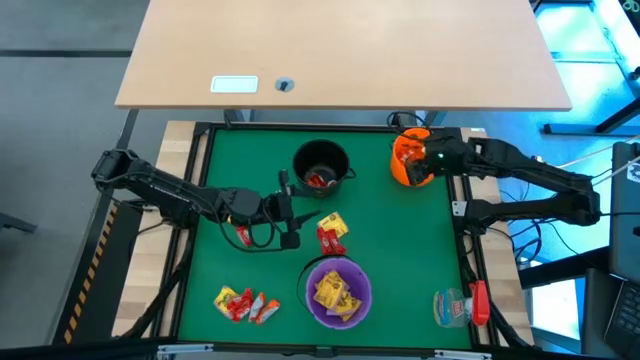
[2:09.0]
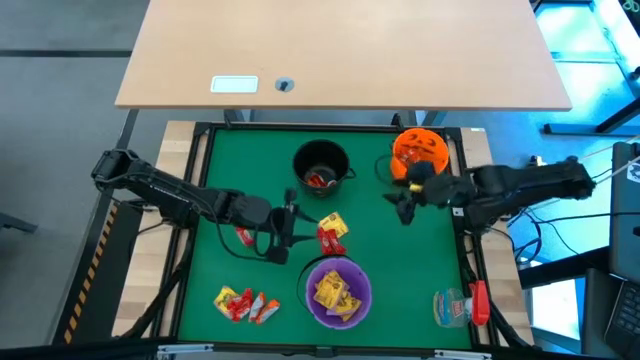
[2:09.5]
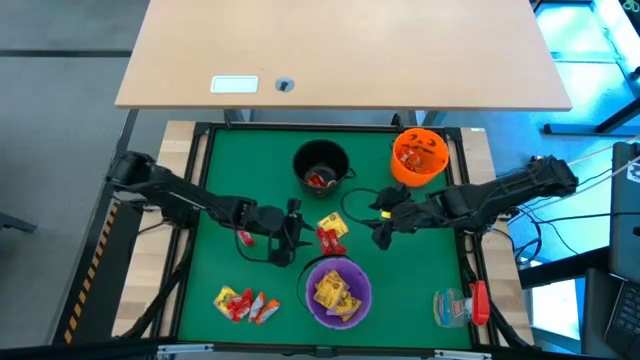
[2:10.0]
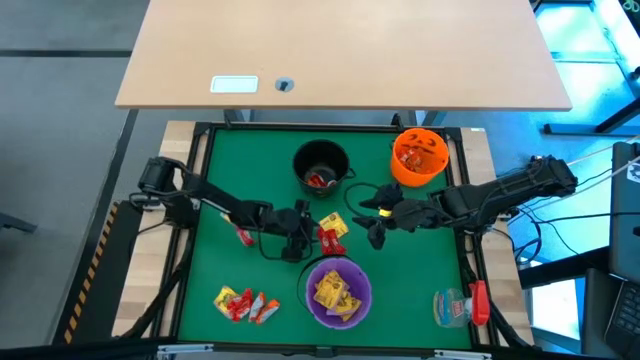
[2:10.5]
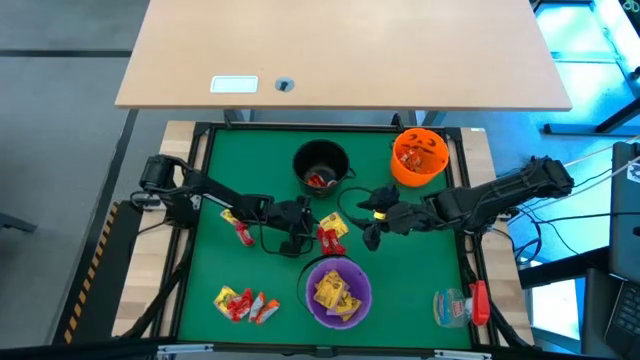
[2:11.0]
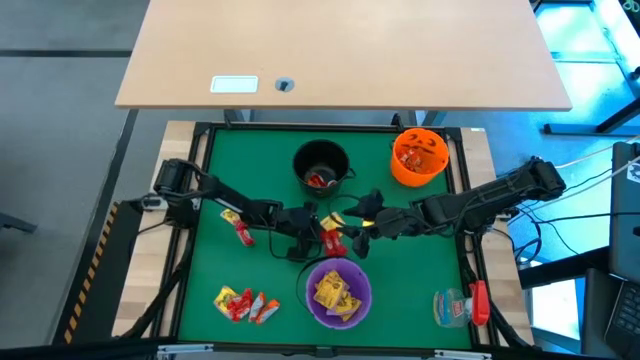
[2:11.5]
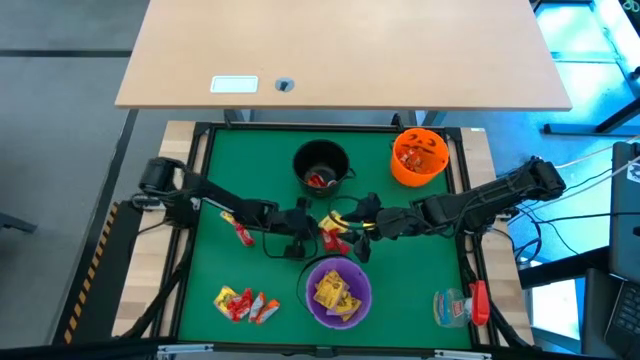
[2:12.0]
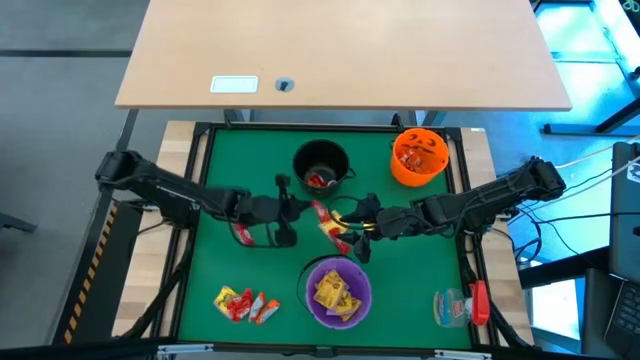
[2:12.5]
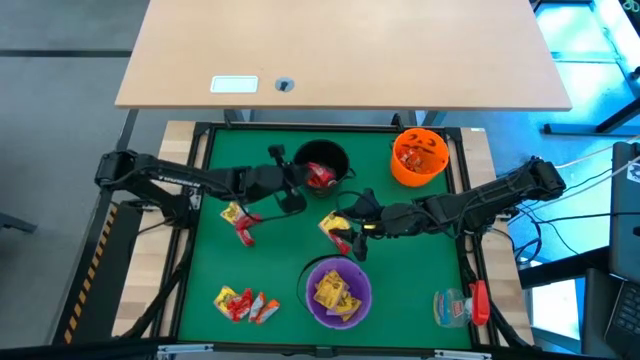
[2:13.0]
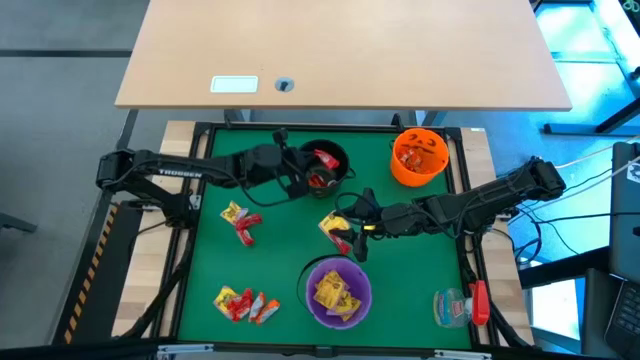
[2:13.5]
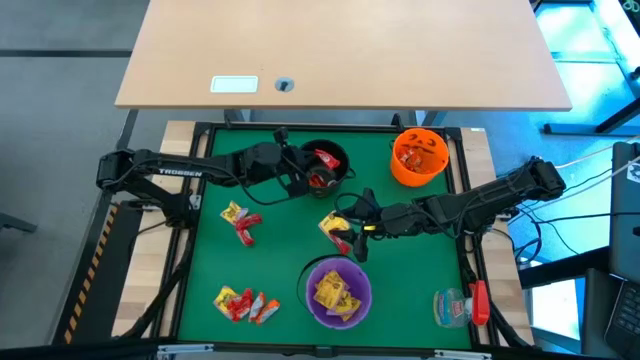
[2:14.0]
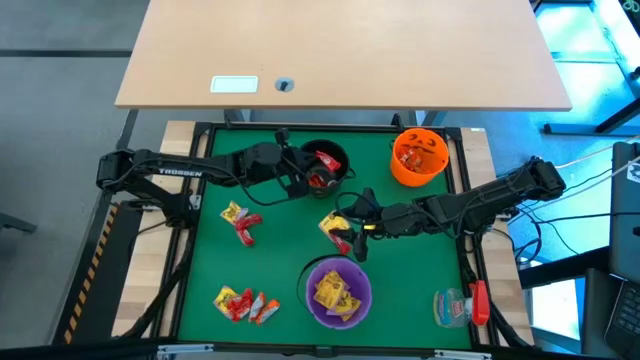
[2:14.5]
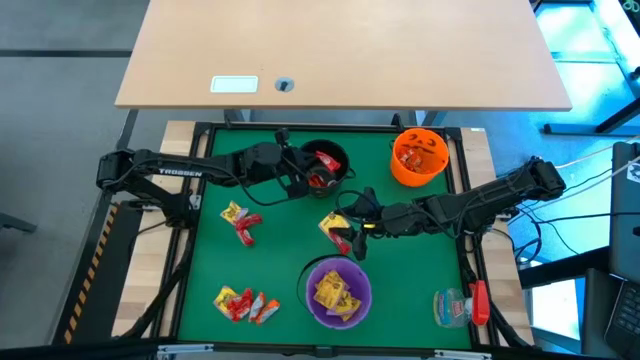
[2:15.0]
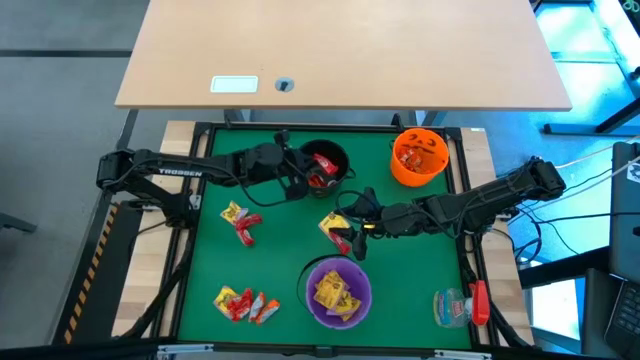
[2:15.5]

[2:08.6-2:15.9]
Task: Sort candy
Put the red candy into the black bucket

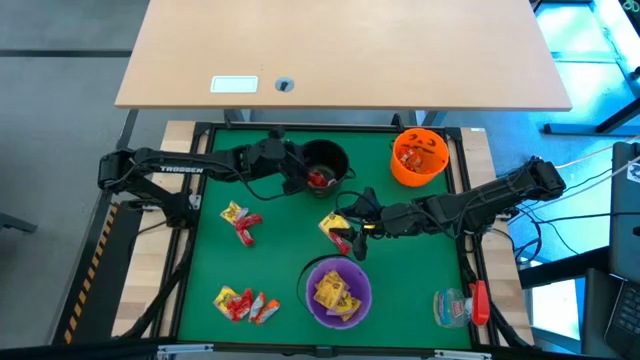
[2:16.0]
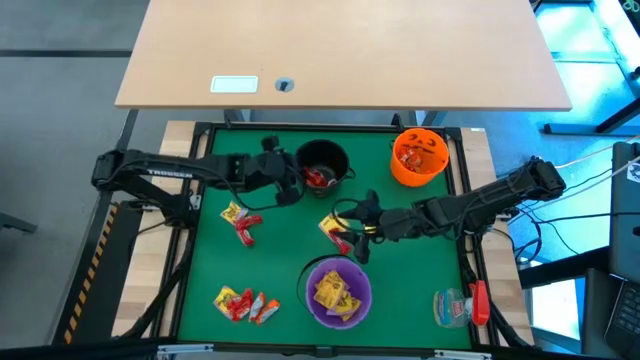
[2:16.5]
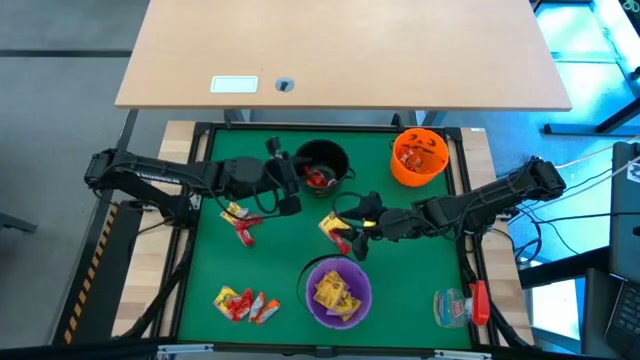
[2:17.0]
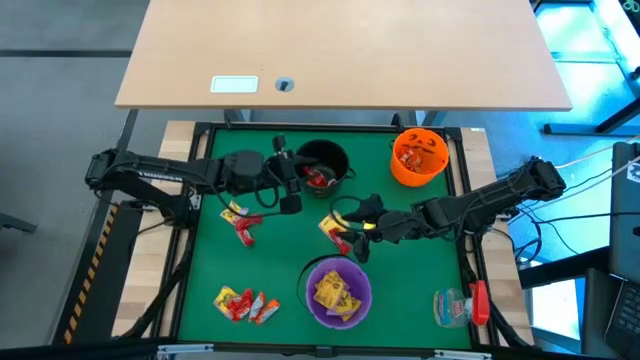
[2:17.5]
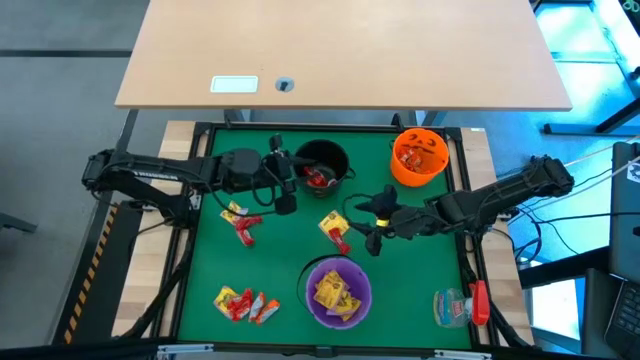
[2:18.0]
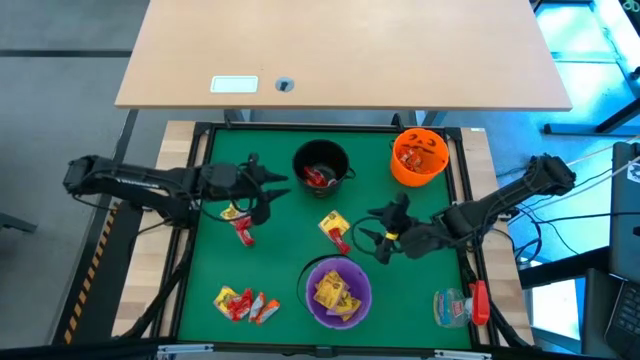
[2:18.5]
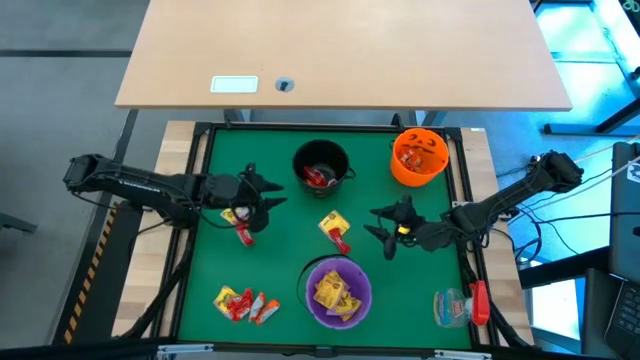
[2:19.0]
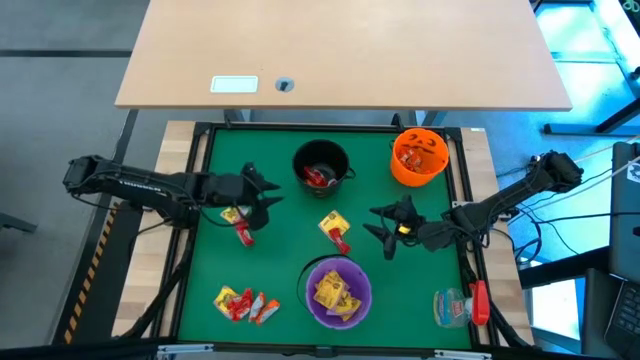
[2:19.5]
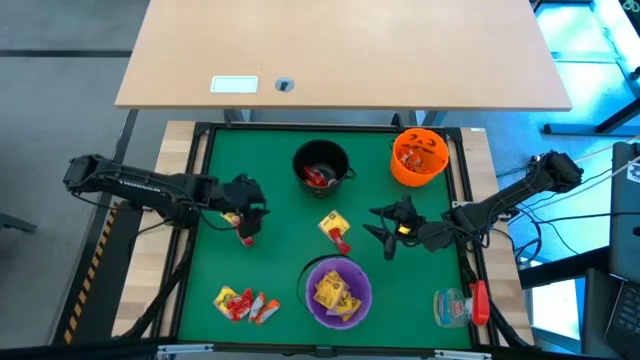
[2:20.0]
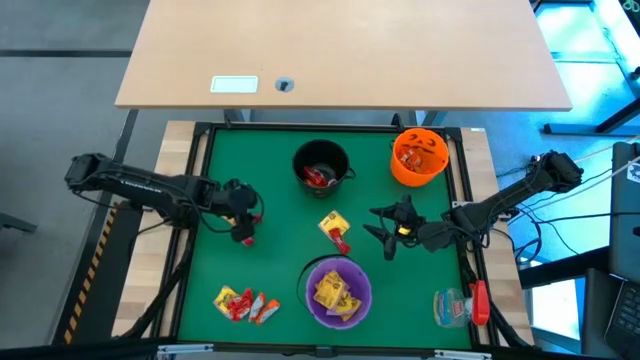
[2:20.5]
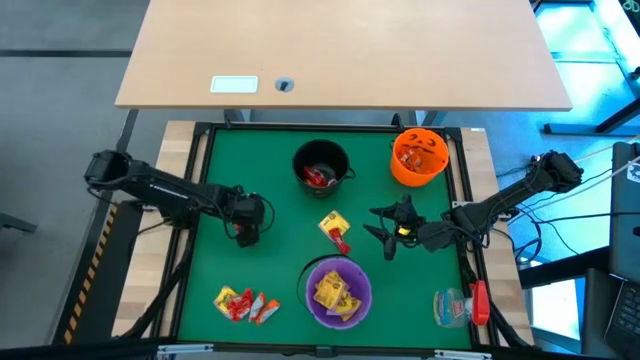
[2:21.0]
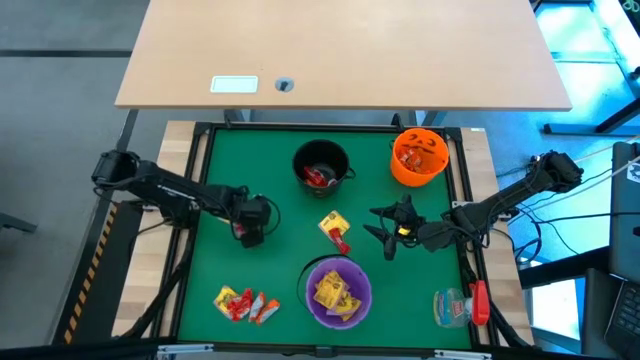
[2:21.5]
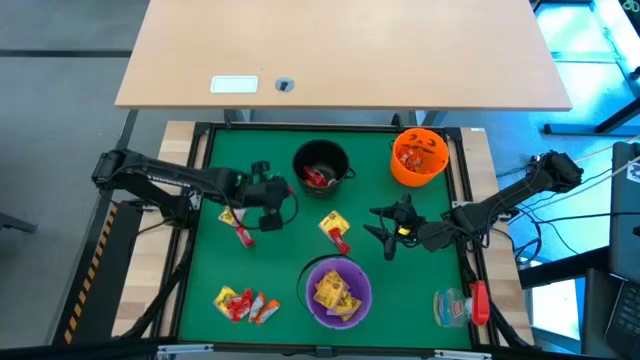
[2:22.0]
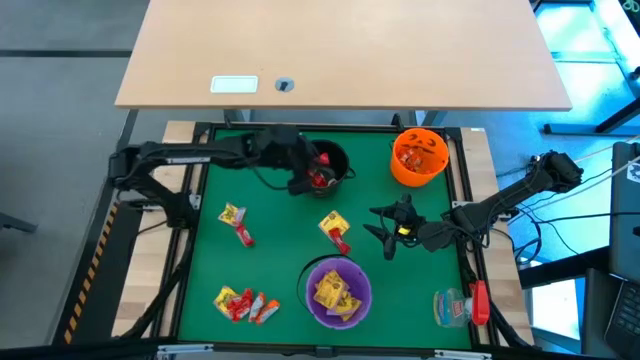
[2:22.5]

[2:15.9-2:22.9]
Put the red candy into the black bucket

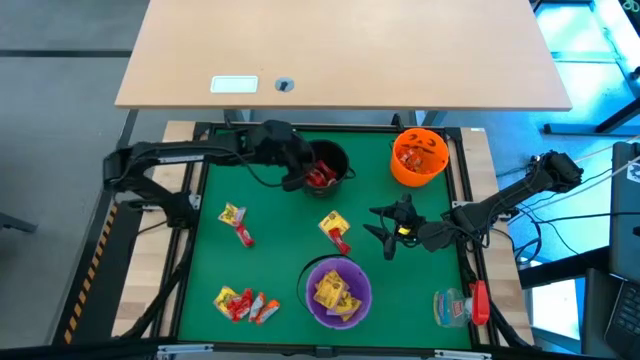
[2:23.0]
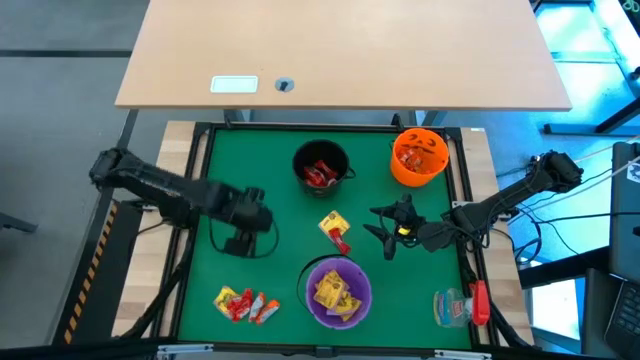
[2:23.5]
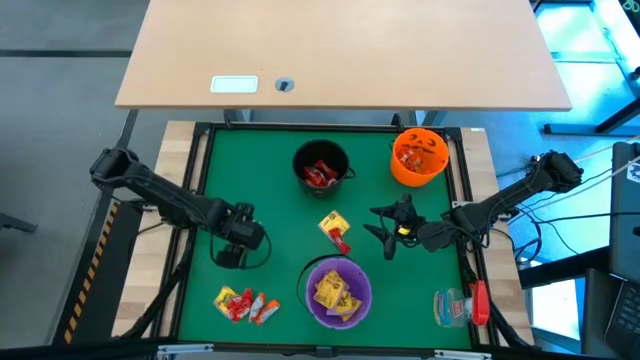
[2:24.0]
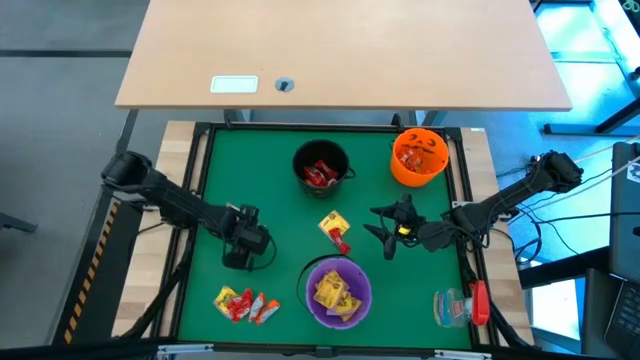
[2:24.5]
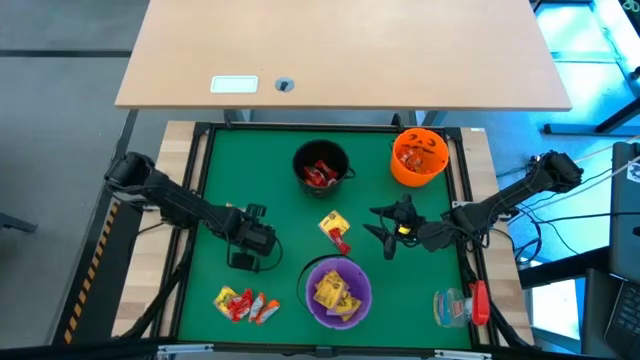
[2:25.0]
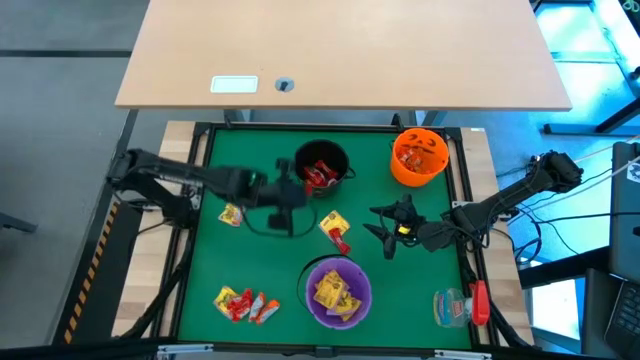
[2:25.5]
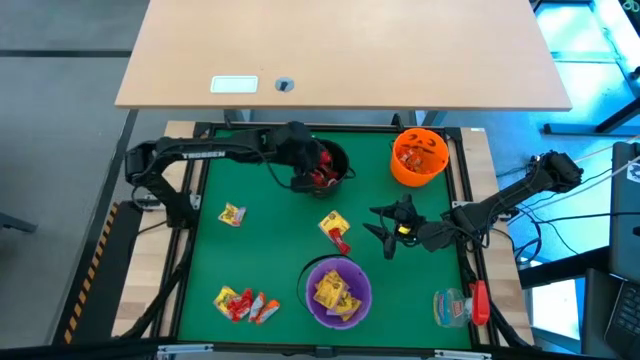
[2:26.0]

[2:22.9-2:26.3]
Put the red candy into the black bucket

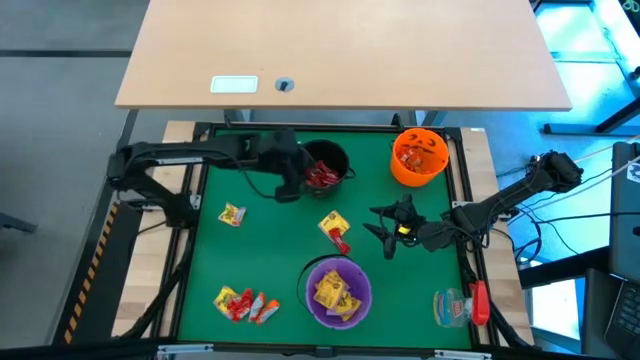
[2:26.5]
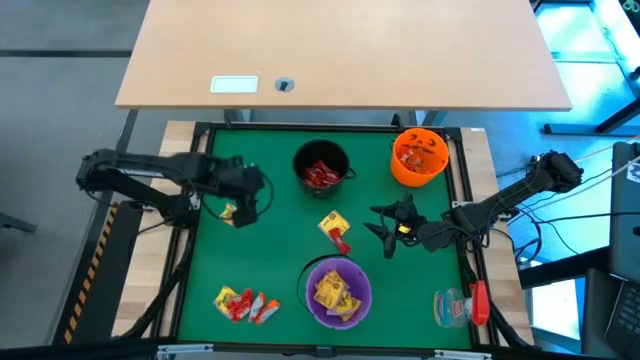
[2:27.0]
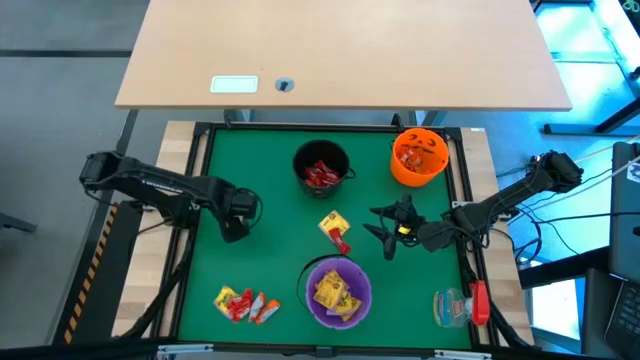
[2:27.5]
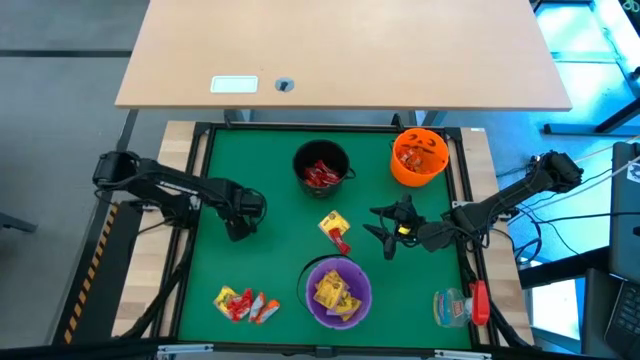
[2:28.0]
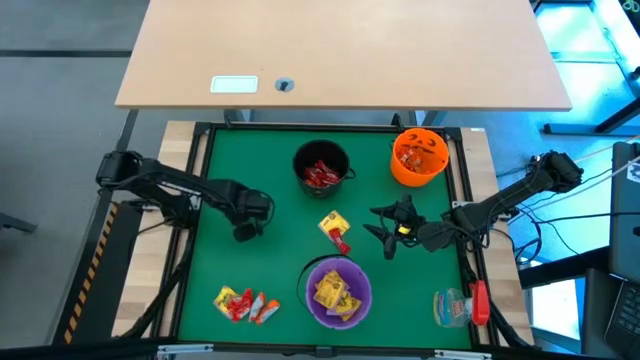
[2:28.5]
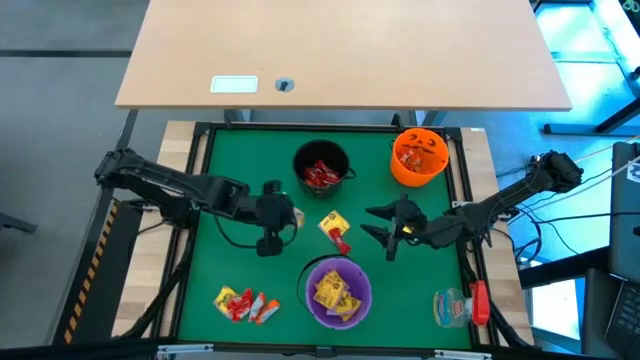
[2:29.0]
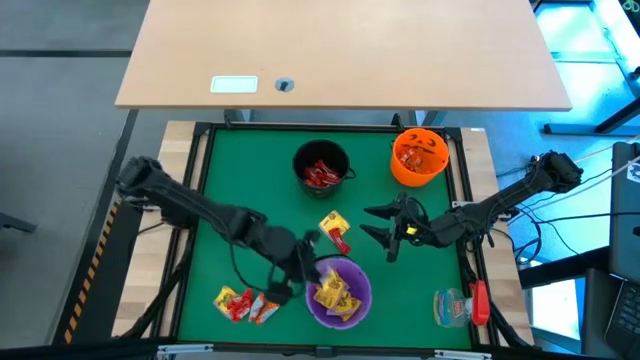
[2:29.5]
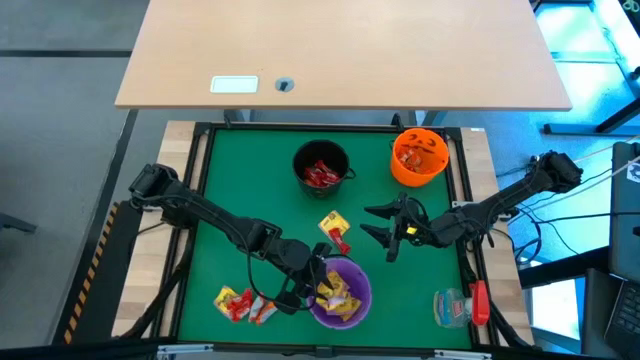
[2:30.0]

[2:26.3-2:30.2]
Put the yellow candy into the purple bucket

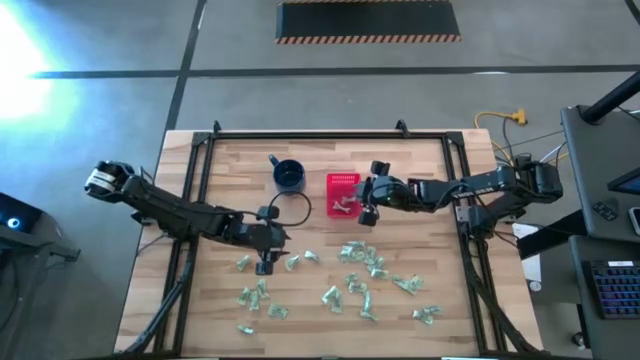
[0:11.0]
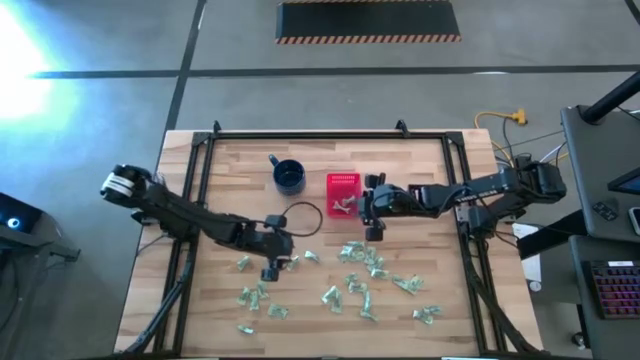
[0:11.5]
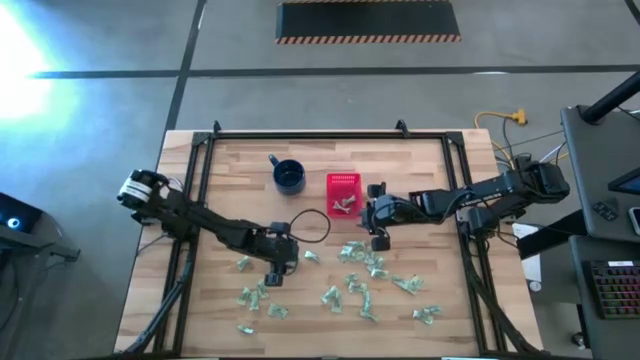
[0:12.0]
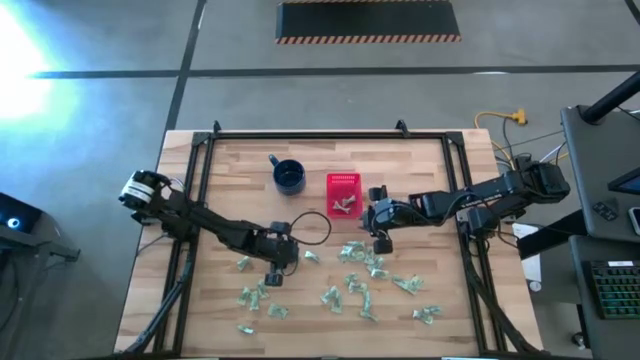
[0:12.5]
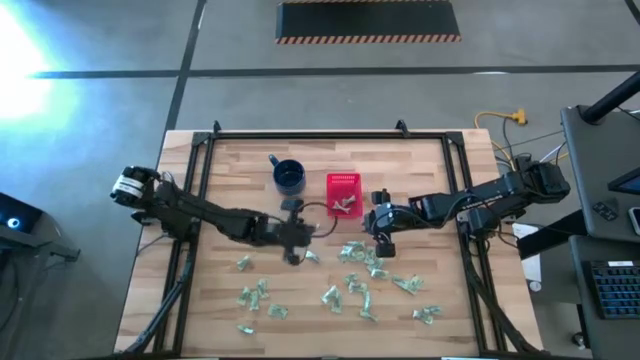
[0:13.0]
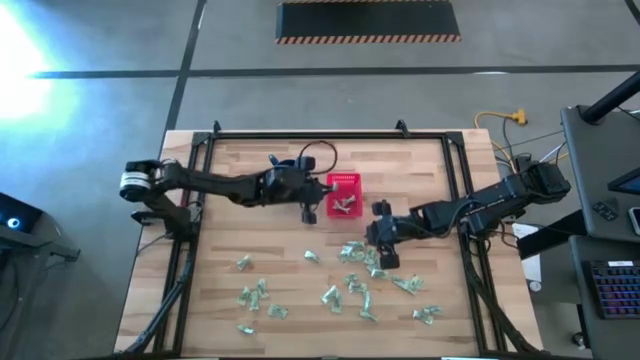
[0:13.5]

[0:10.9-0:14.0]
Task: Pick and place items into bin
Put the green stevia packet into the red bin
